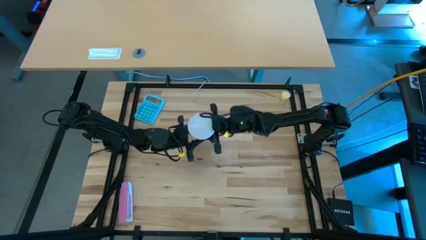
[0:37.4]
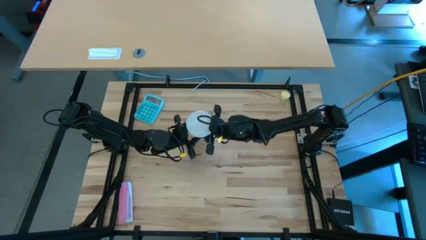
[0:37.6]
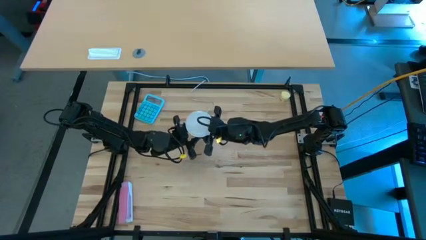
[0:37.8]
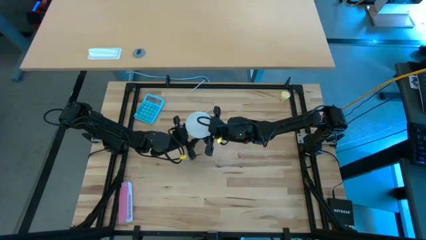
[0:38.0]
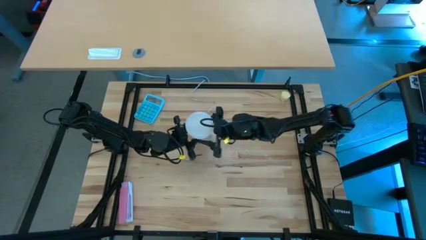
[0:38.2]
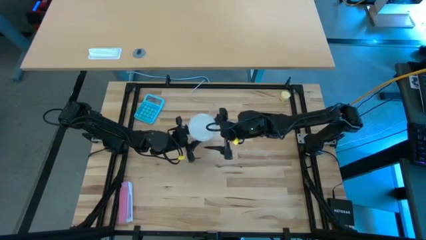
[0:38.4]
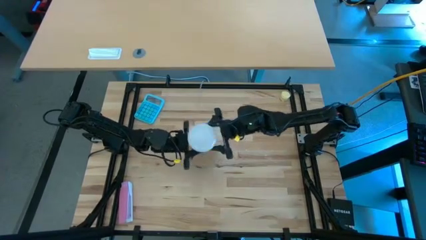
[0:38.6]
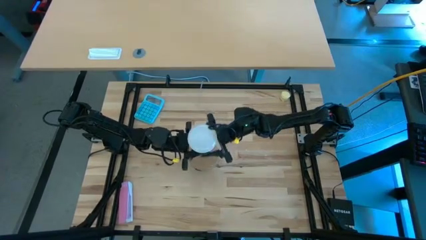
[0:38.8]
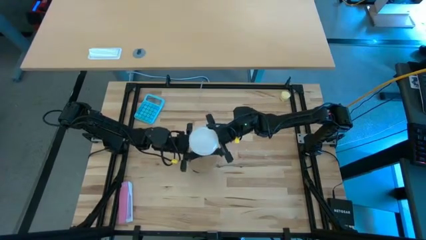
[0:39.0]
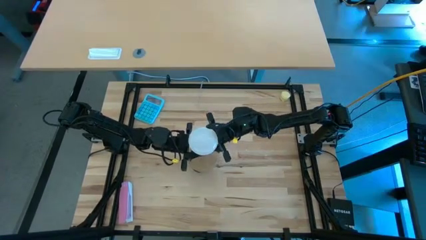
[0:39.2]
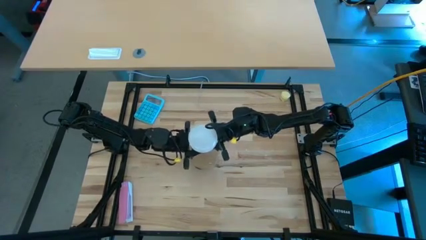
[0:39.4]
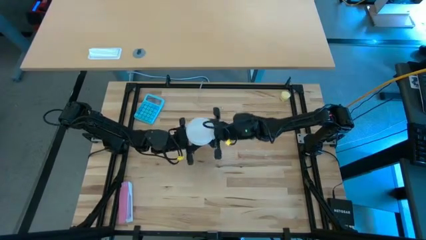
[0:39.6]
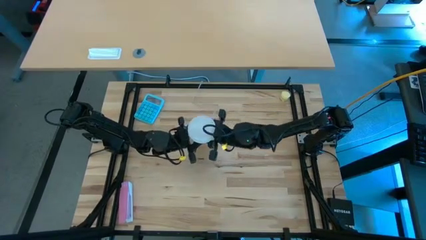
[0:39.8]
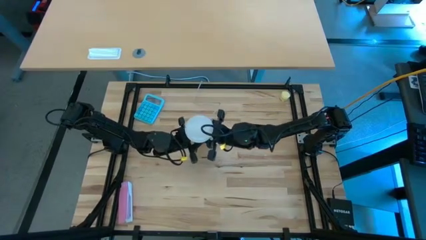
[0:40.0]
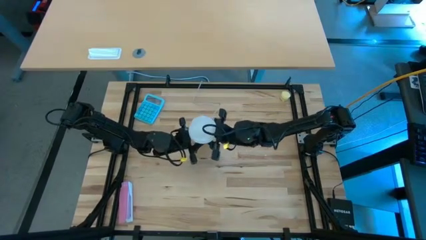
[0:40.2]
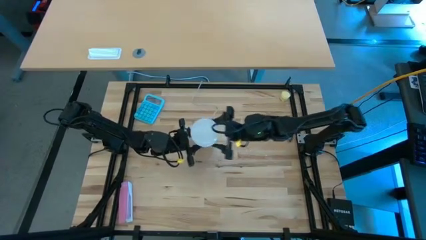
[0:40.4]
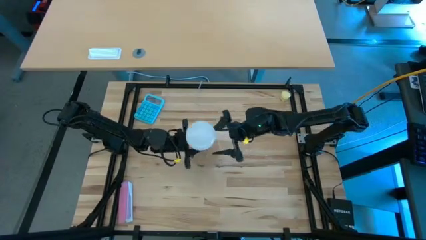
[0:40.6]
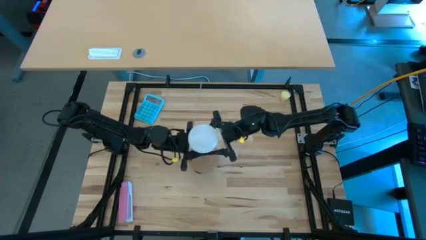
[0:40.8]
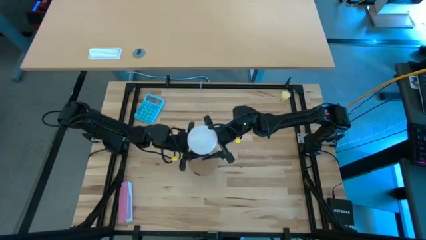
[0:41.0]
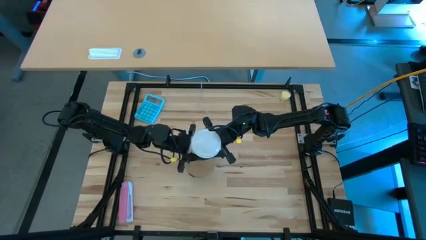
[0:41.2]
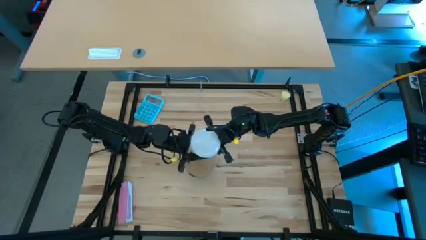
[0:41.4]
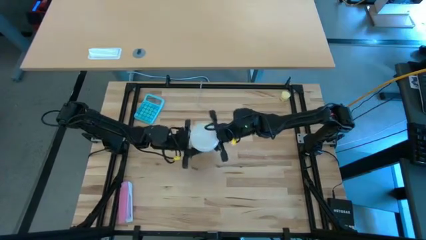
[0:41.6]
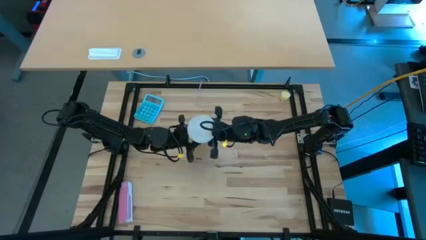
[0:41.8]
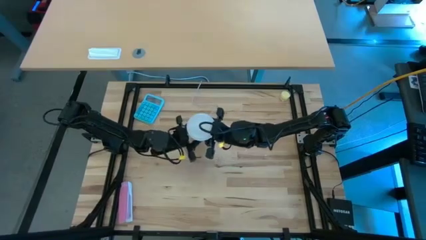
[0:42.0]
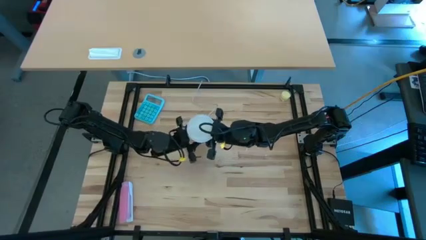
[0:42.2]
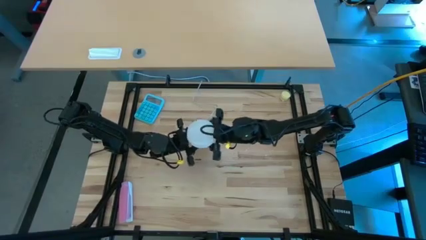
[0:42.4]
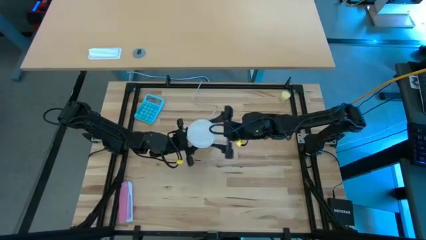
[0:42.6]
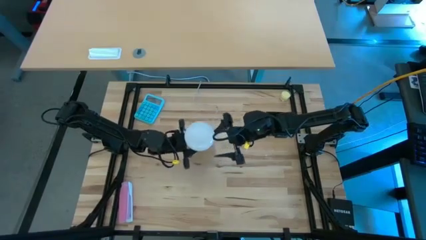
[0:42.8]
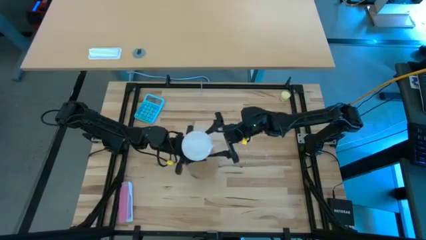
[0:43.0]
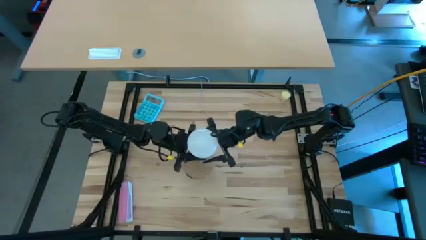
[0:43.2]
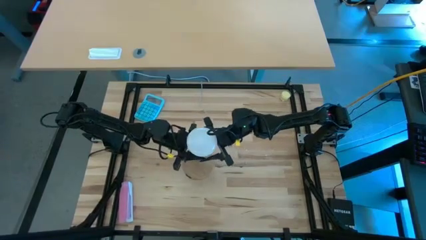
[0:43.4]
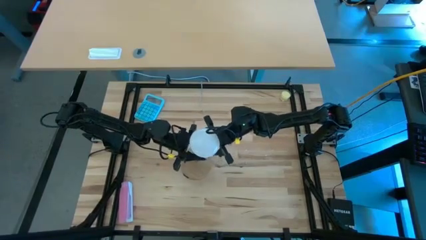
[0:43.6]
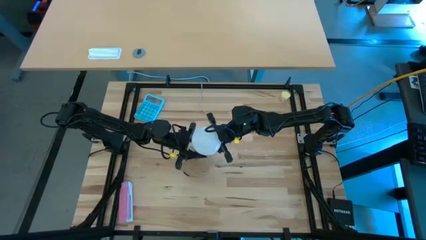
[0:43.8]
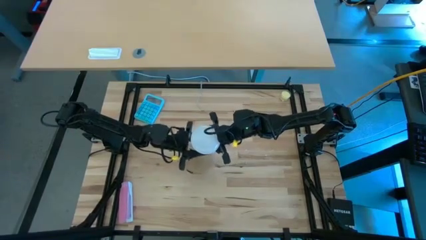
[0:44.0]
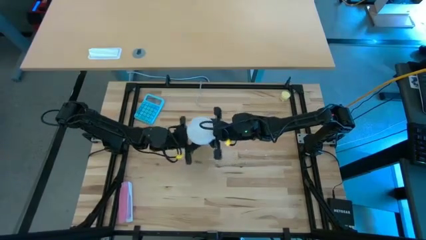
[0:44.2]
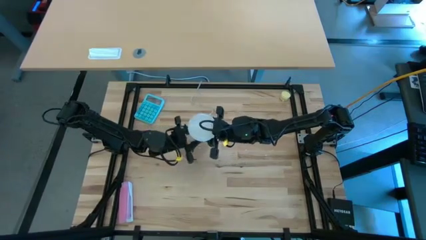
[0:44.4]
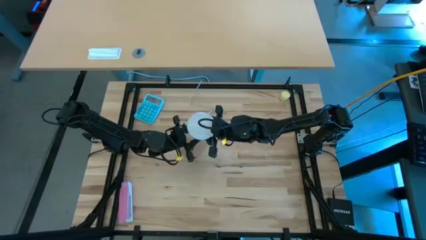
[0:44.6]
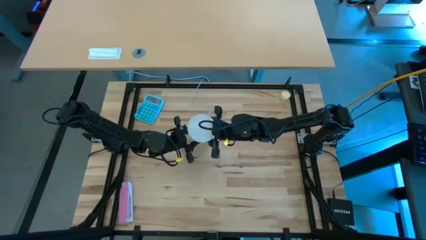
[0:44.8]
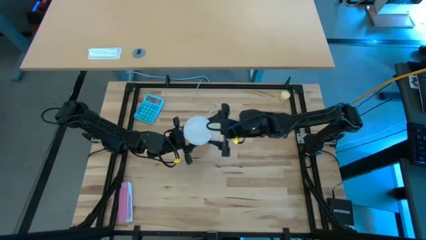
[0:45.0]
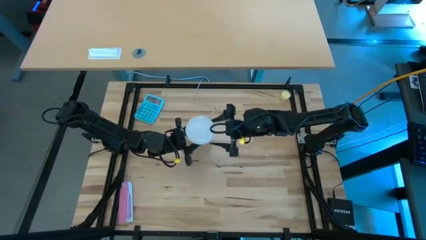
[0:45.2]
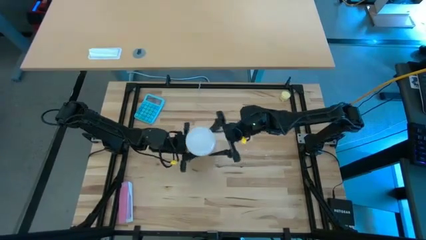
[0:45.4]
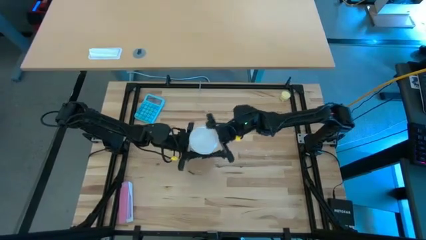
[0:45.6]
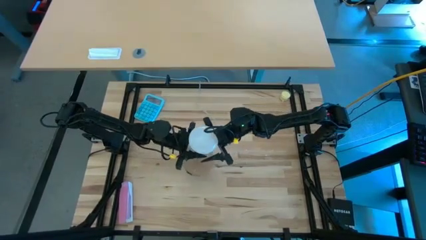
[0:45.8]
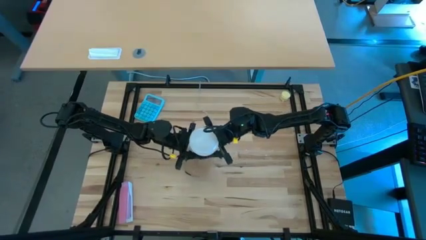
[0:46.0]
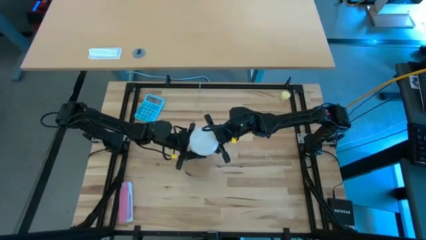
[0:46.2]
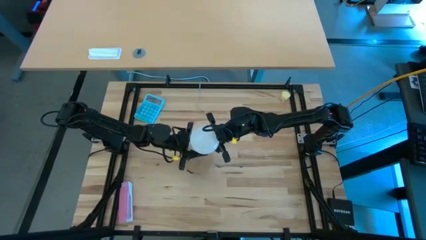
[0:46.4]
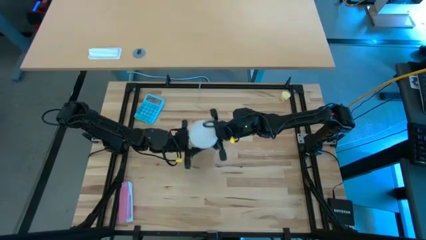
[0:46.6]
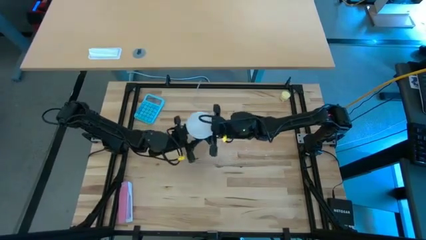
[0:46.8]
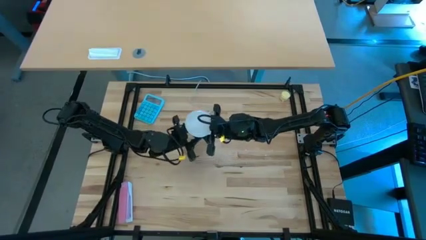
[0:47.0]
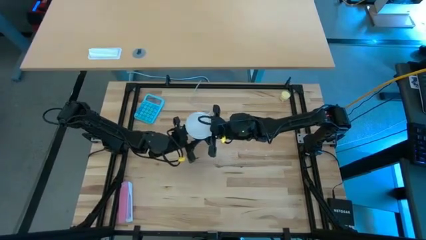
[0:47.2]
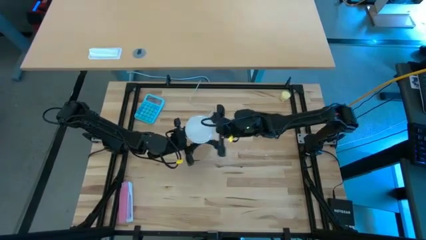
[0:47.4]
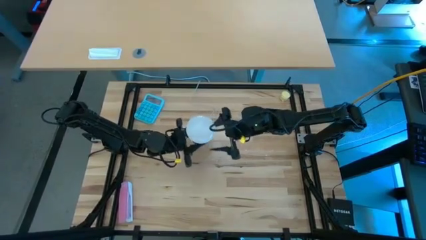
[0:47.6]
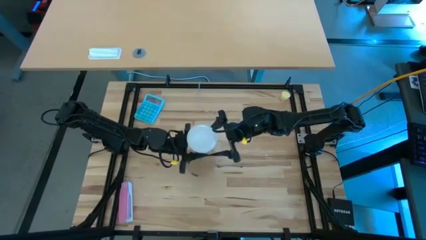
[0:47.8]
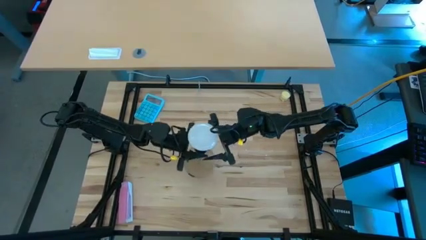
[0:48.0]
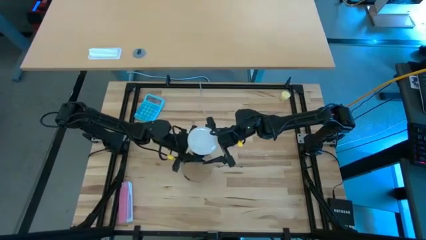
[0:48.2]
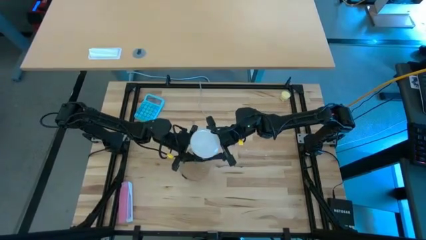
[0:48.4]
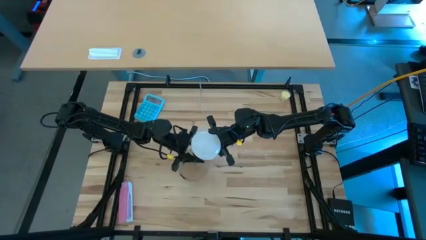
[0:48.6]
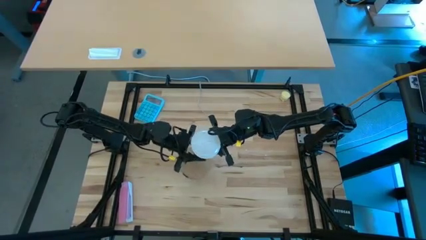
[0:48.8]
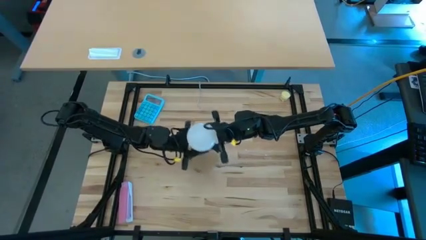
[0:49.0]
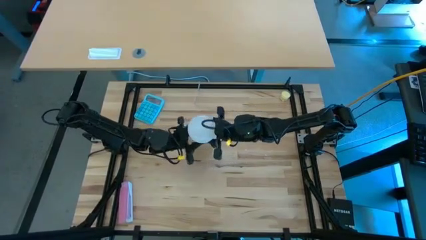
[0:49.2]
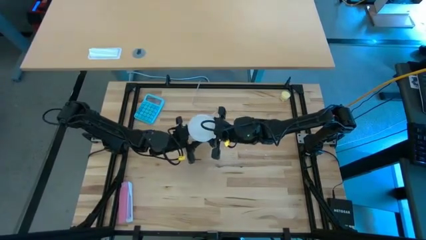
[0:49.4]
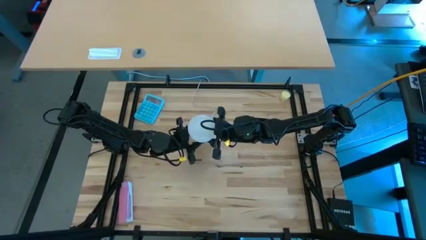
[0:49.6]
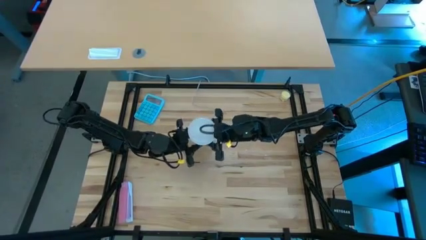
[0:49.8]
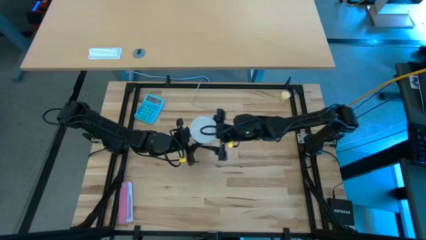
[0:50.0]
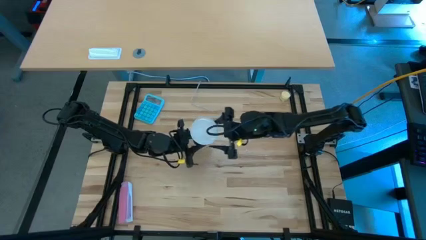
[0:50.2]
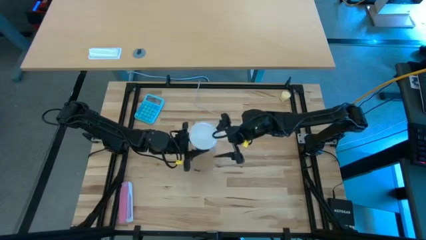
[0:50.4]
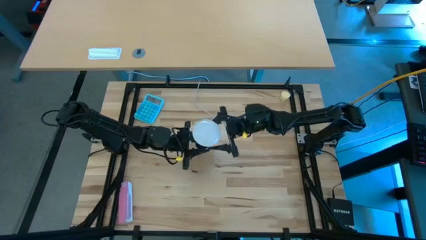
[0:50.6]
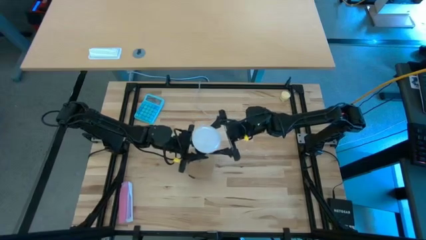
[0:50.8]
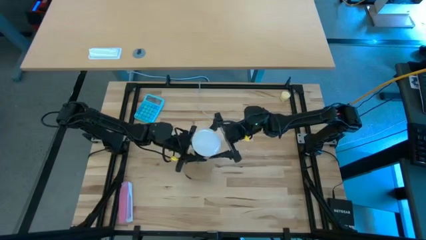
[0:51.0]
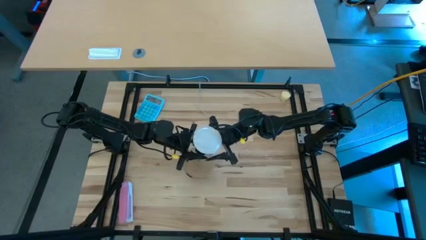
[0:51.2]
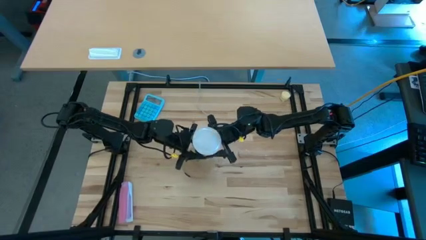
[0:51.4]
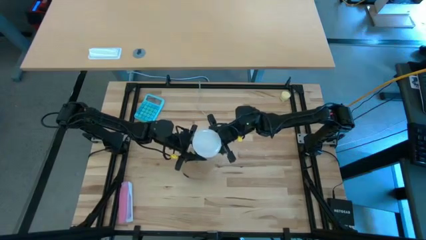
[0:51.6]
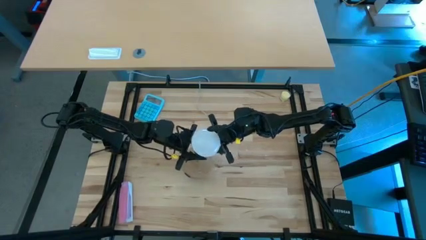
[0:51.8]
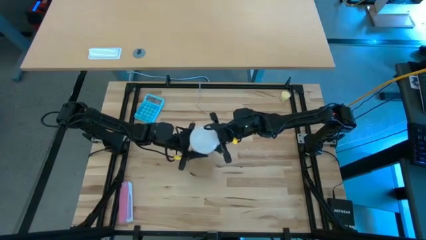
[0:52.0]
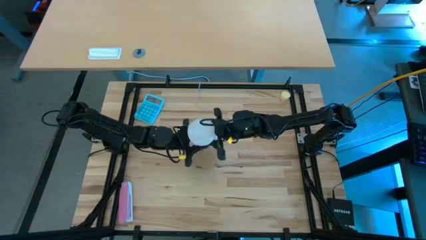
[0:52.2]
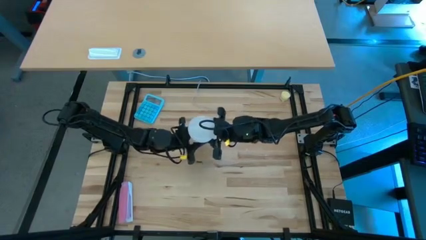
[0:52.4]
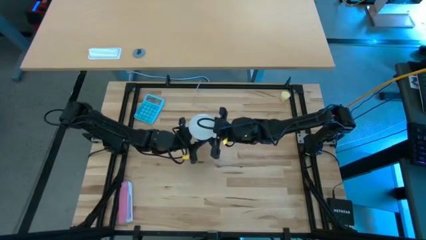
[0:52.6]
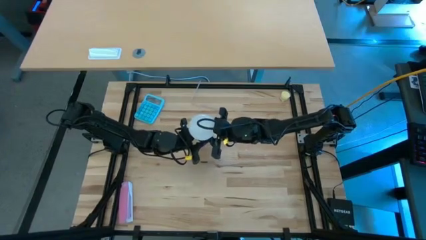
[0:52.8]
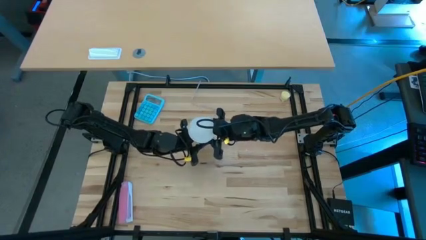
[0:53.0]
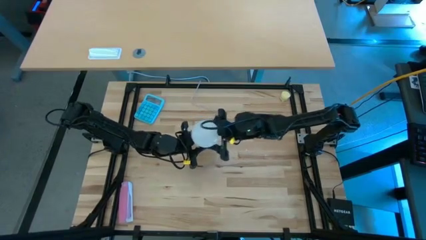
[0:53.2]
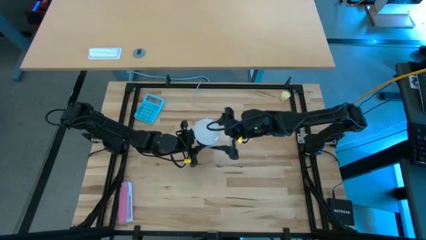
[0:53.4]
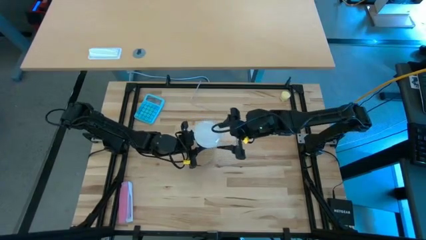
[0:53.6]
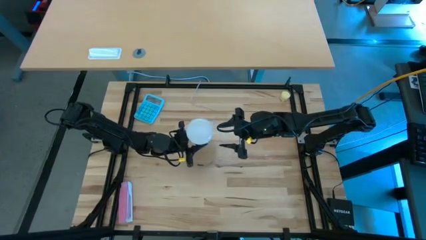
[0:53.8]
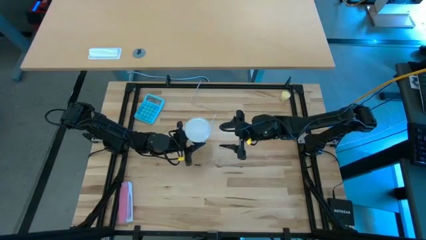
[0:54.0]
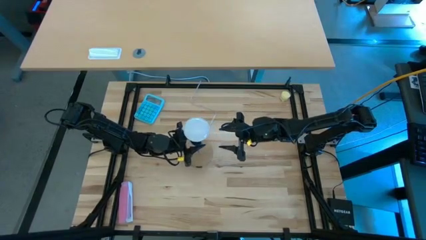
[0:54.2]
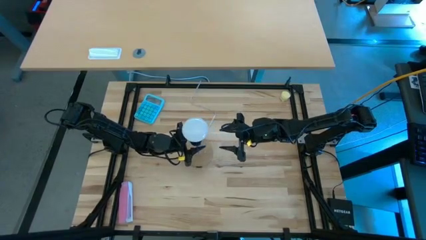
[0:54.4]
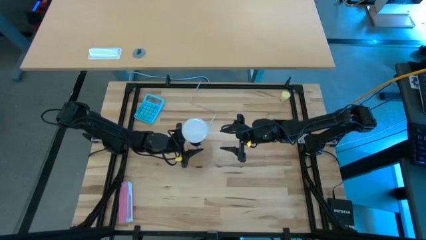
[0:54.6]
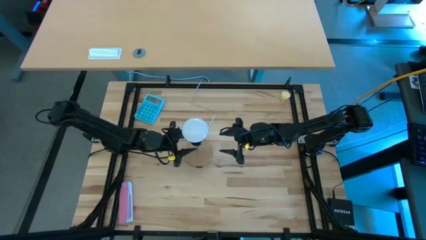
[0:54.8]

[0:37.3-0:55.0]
Task: Screw lightbulb
Insert the light bulb into the lamp
